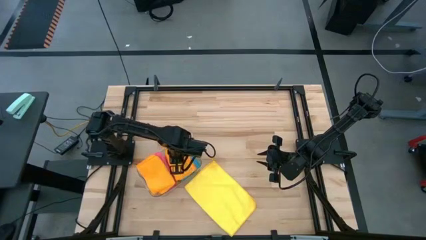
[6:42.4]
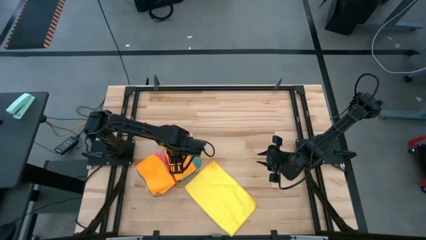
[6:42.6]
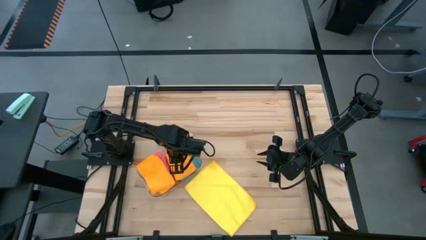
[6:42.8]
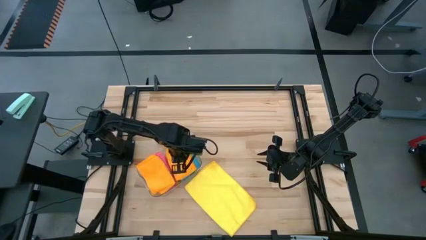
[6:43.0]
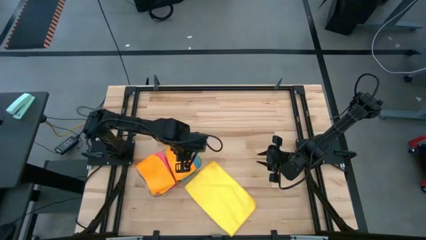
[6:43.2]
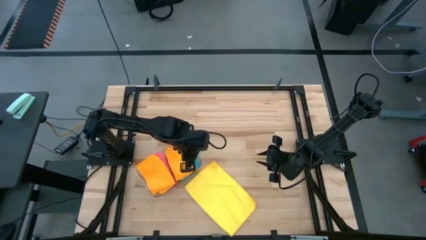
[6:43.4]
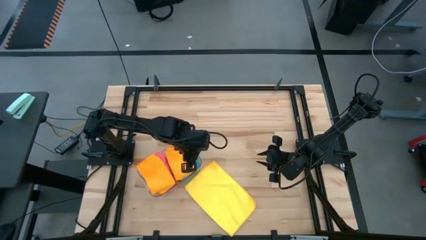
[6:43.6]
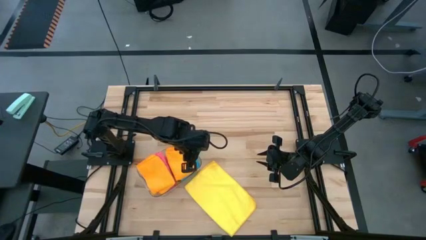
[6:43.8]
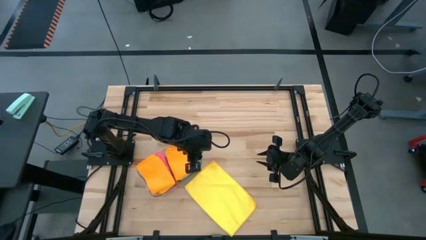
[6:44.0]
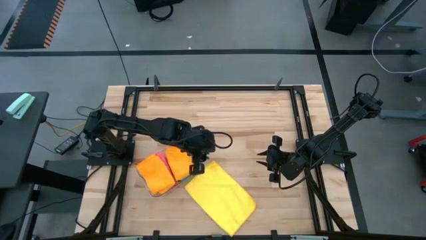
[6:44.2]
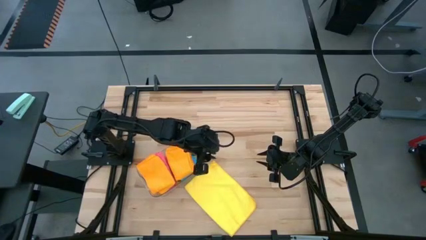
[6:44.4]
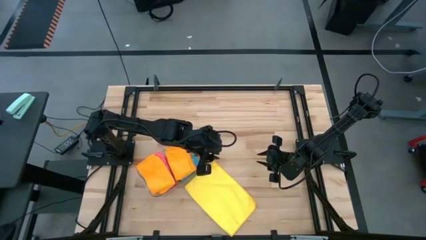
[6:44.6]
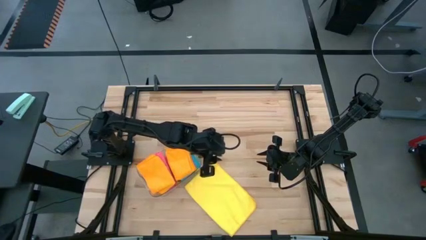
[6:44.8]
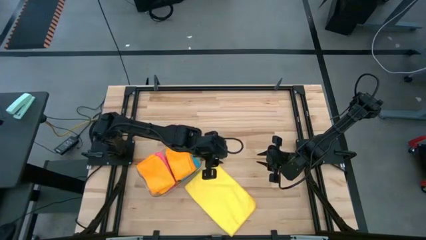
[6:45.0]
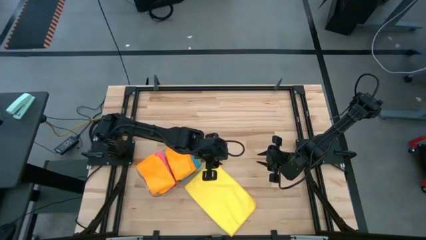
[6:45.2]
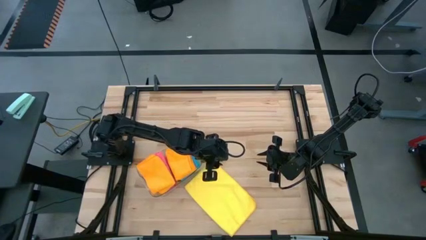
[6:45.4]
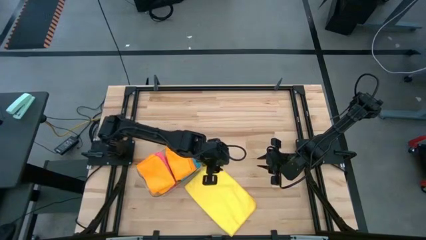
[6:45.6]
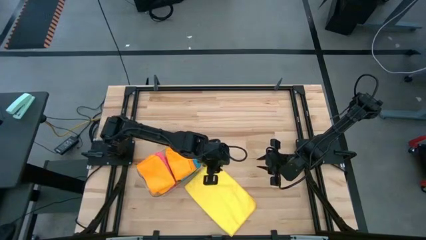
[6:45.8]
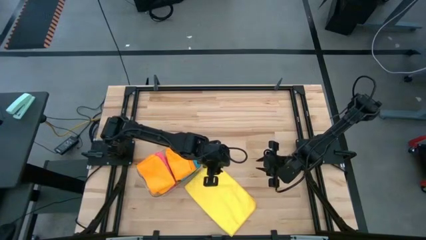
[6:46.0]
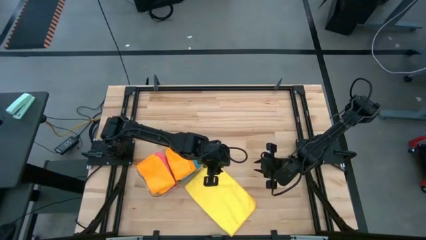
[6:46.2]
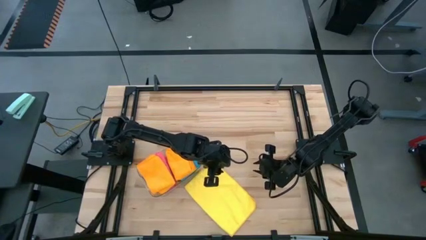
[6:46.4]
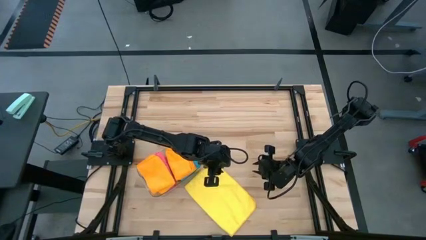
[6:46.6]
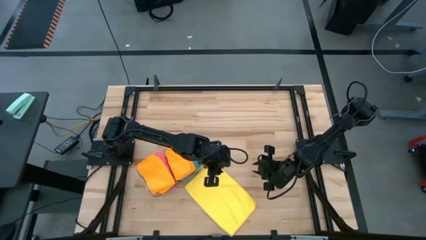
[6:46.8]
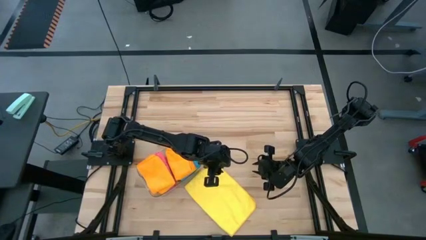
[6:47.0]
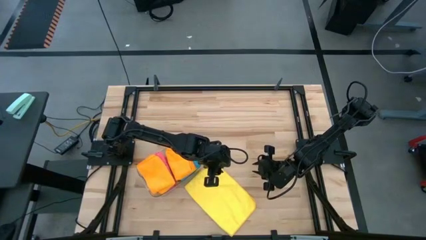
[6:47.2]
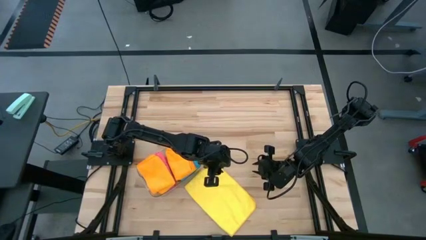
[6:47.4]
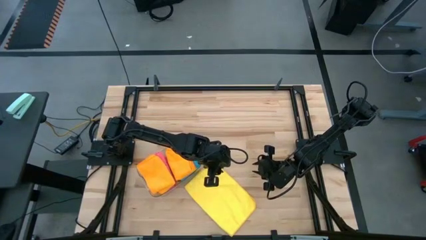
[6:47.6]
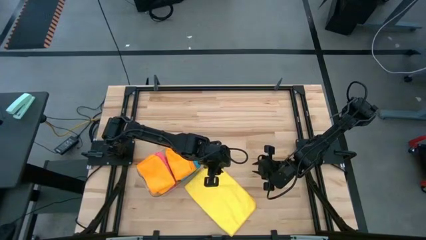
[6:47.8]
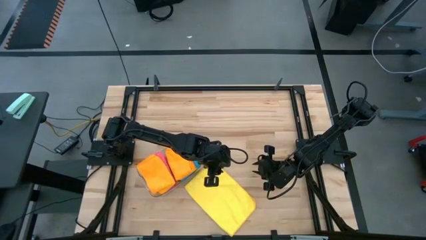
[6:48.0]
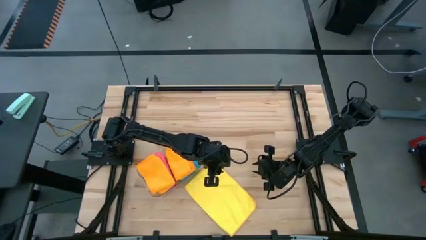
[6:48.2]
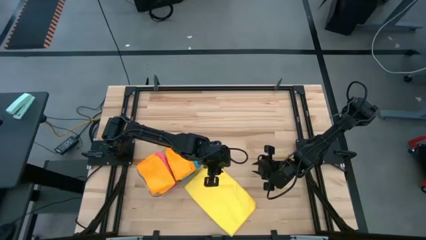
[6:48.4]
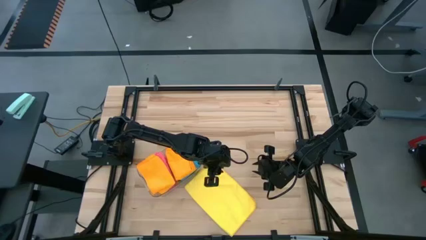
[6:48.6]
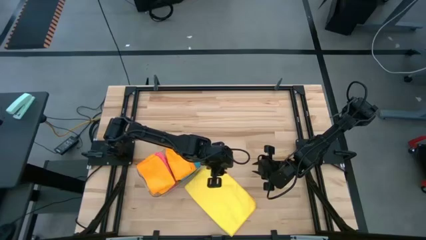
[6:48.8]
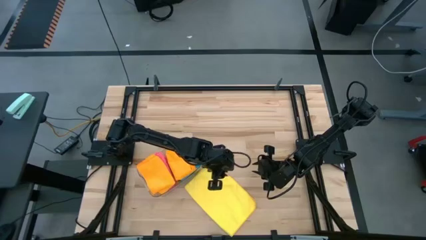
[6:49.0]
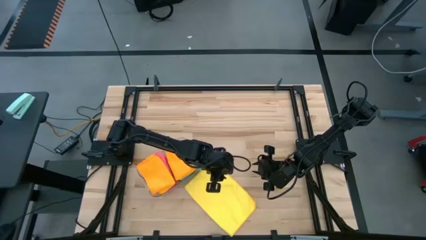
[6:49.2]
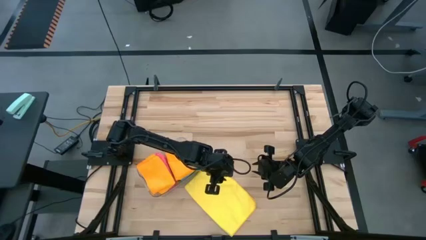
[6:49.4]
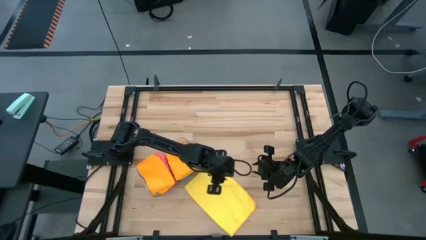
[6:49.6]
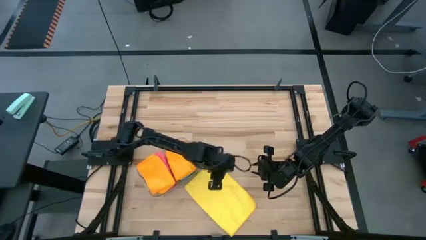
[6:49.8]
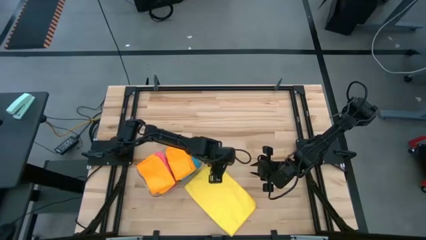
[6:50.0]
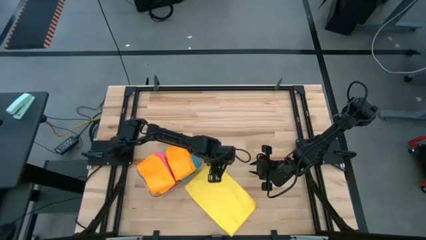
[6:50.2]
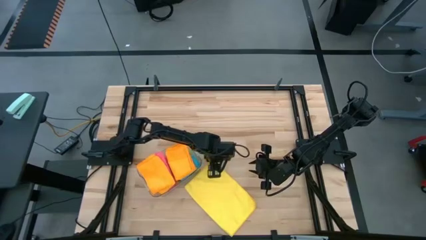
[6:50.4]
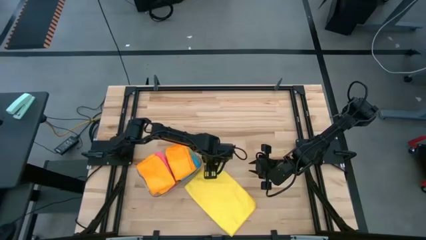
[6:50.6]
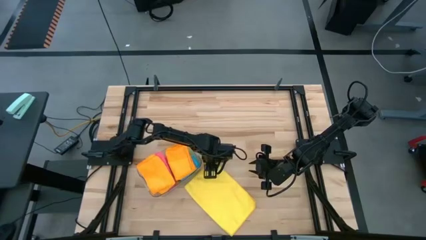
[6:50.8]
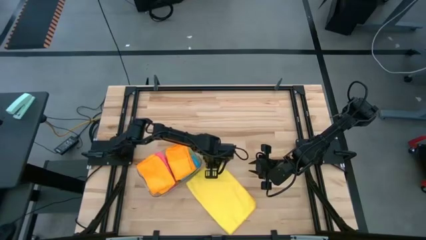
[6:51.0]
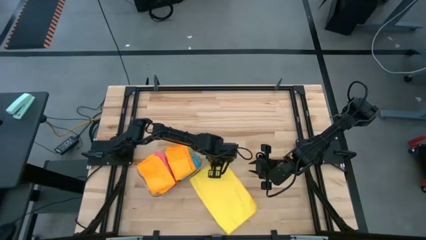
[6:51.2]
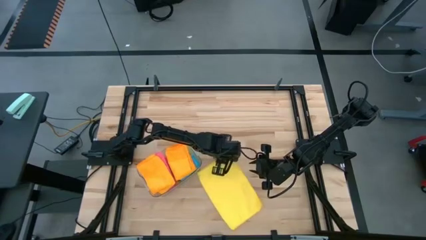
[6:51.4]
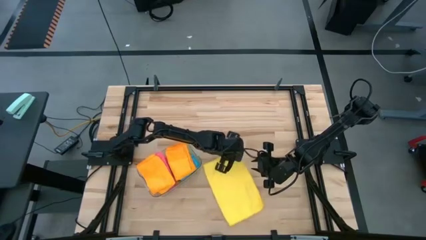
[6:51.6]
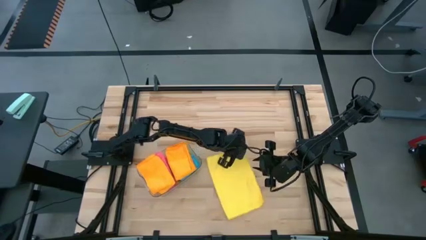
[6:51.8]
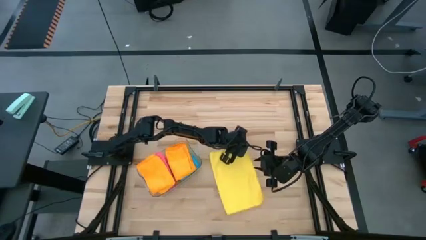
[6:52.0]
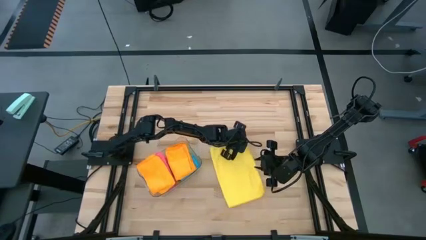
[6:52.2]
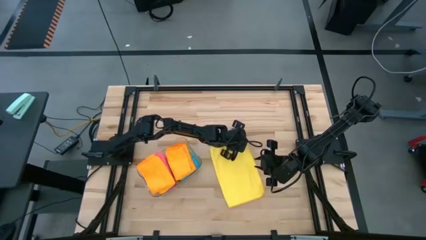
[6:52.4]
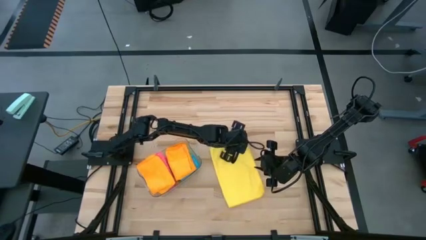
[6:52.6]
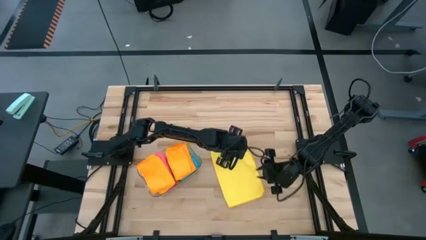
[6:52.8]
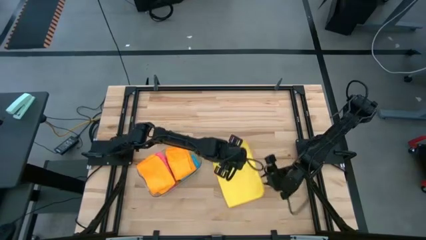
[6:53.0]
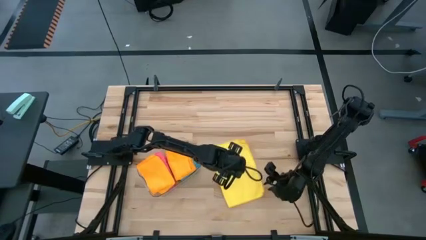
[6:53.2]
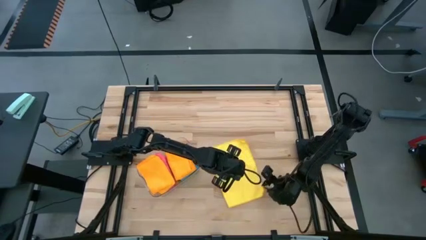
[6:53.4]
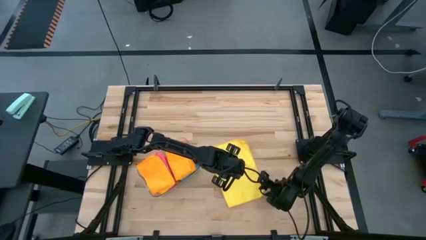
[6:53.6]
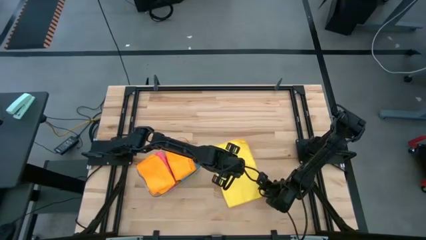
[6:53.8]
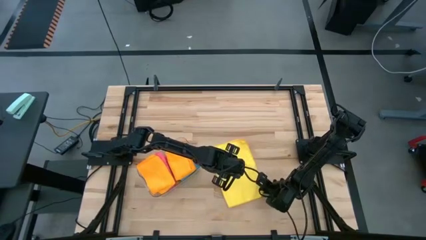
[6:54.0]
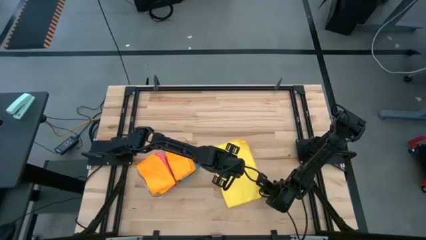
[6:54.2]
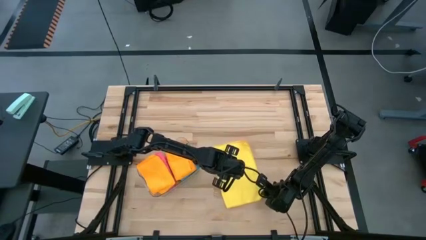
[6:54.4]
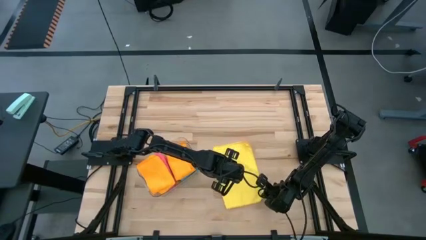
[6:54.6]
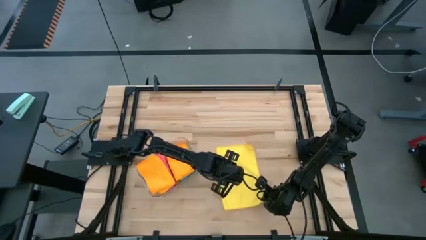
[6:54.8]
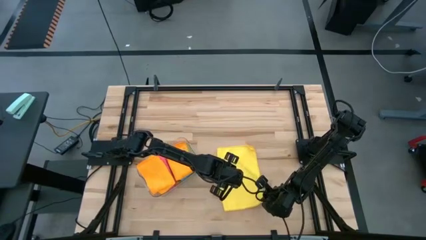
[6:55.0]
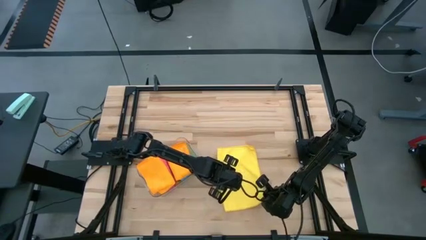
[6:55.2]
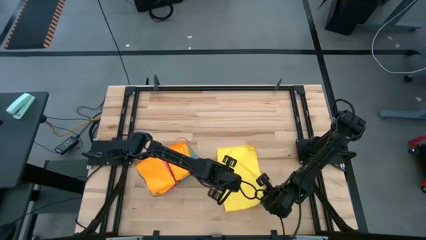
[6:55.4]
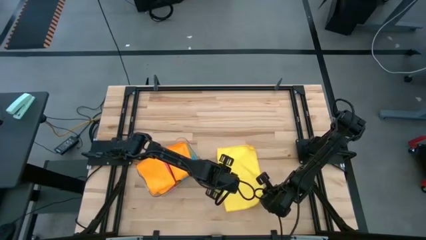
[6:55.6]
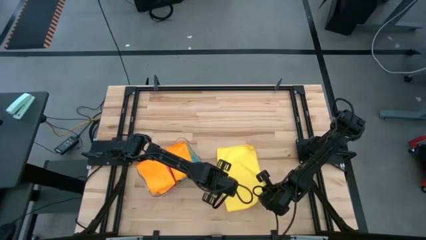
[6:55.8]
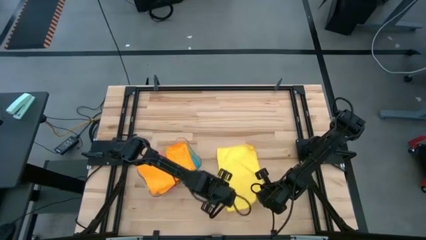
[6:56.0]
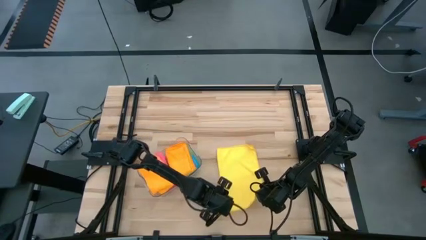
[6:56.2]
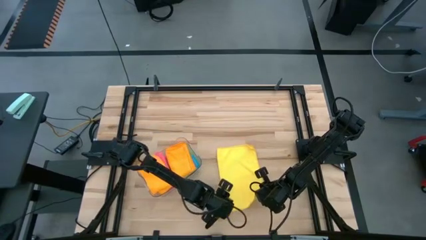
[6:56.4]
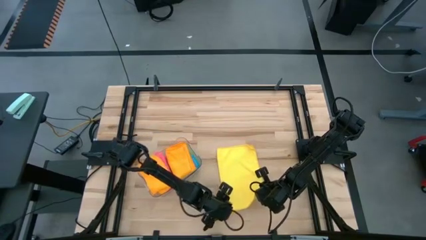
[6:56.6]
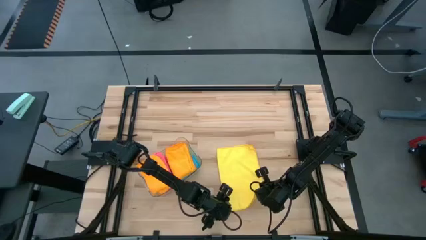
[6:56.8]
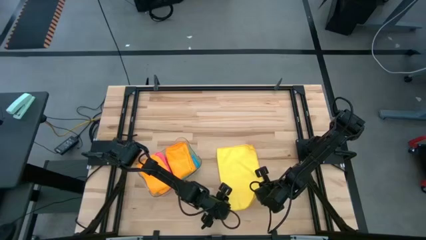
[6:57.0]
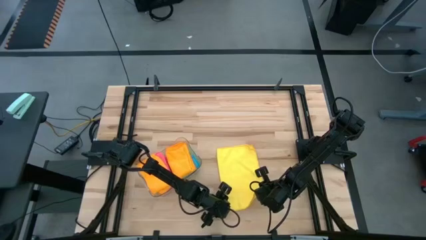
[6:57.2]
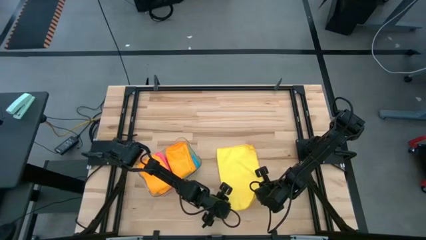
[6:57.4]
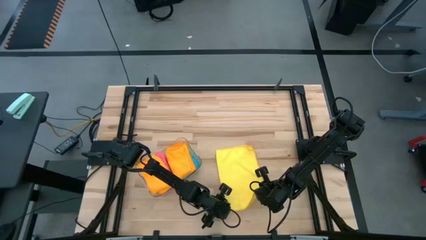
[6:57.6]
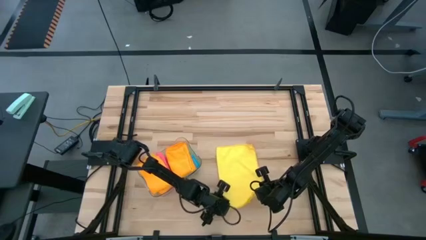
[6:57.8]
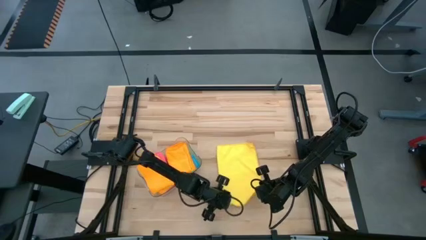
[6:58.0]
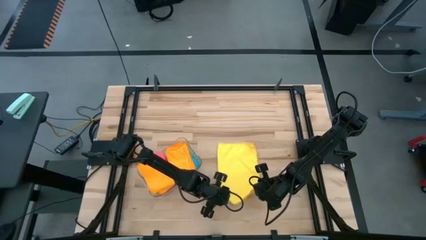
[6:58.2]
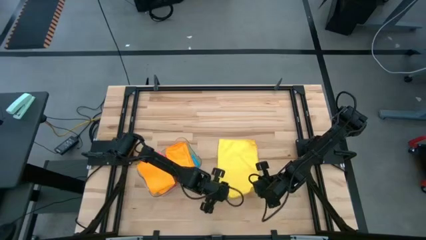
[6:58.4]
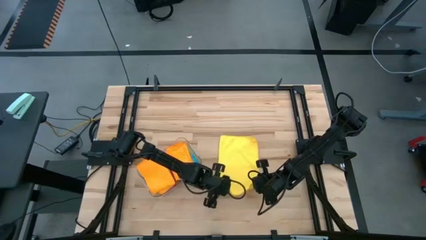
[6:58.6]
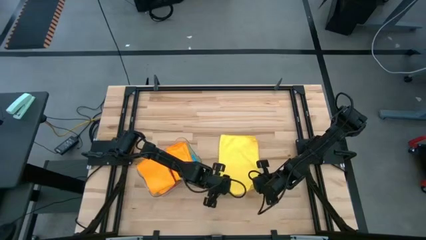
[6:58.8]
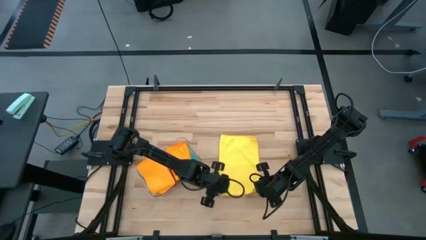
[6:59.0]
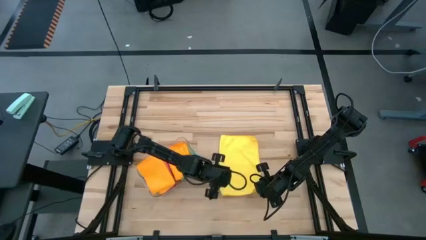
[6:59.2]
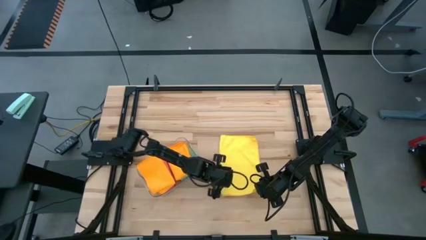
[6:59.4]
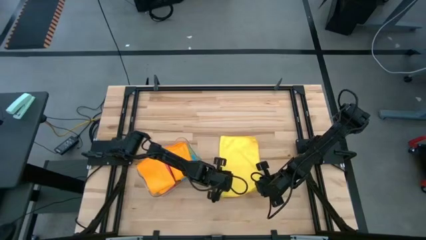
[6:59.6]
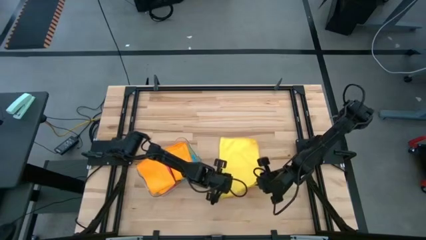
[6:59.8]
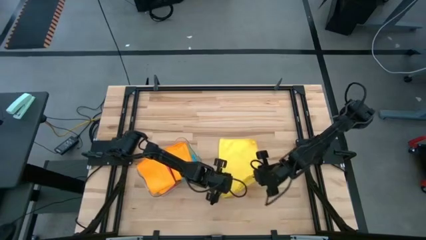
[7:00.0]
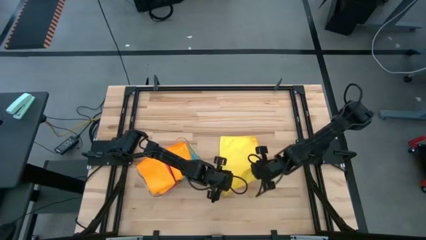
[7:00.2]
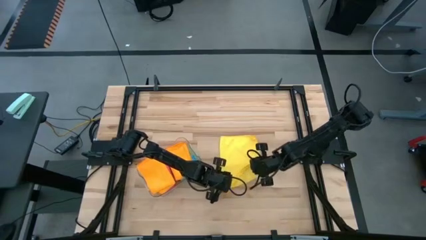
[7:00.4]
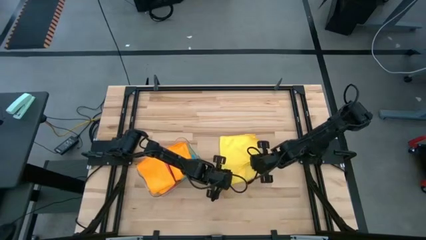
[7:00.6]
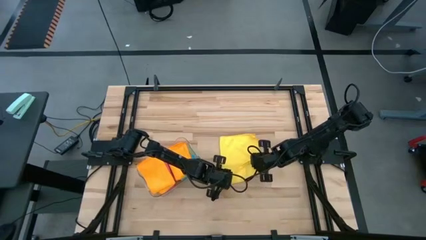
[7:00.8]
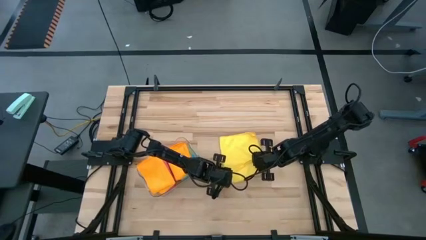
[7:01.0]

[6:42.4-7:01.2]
Task: Fold microfiber towels
Fold the yellow microfiber cloth
